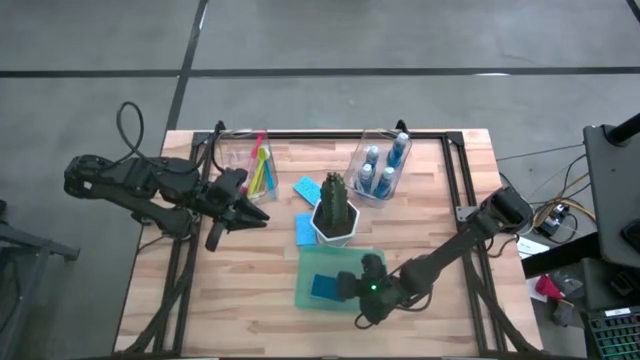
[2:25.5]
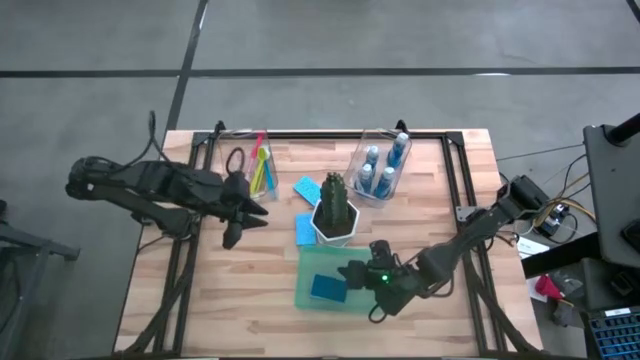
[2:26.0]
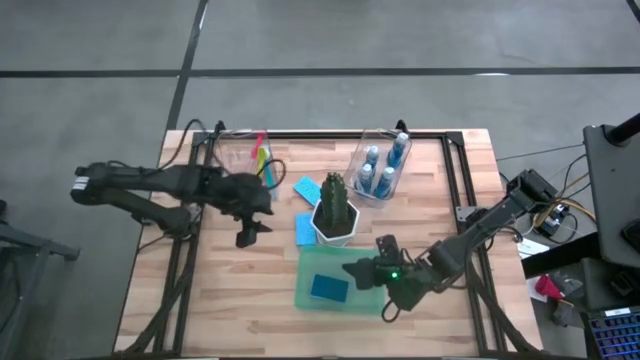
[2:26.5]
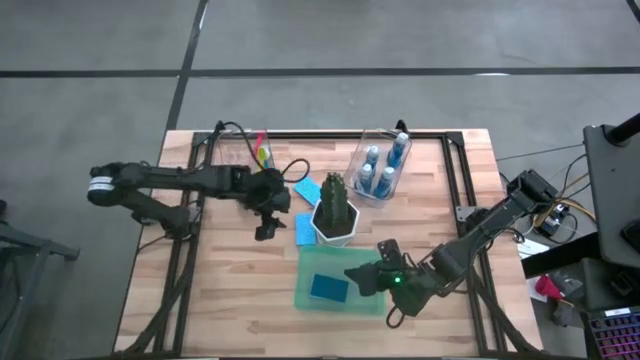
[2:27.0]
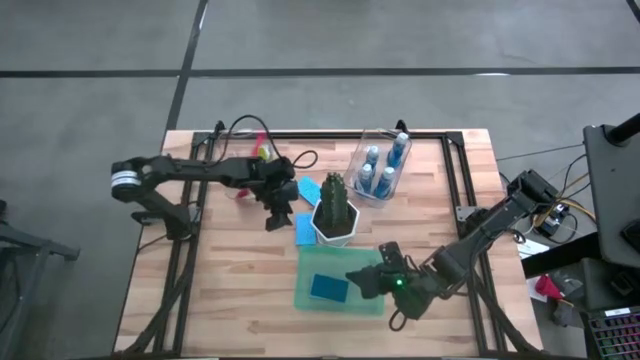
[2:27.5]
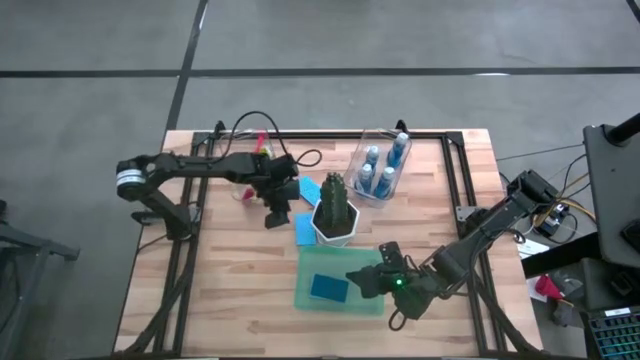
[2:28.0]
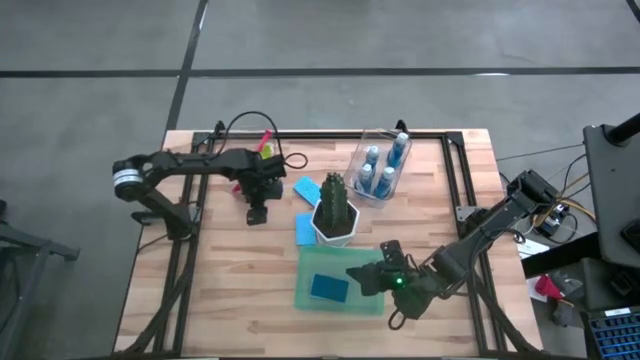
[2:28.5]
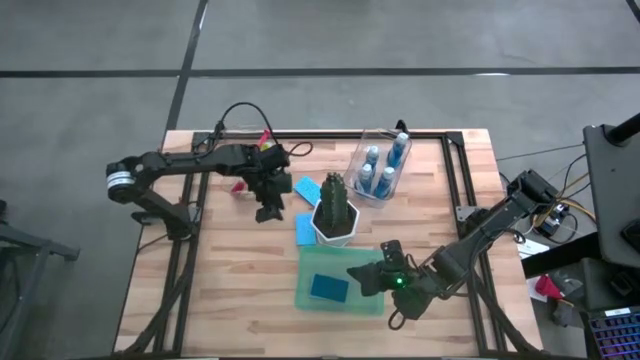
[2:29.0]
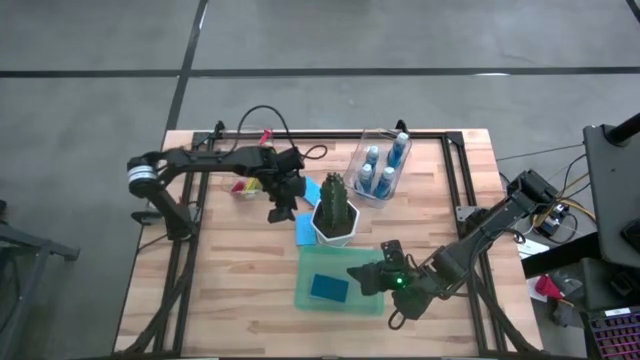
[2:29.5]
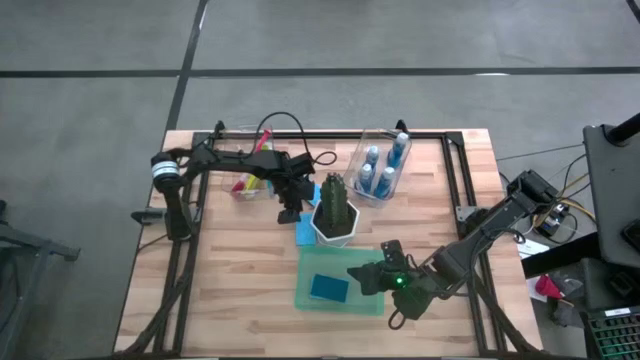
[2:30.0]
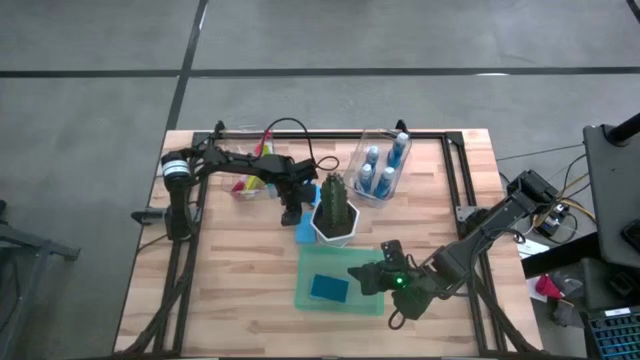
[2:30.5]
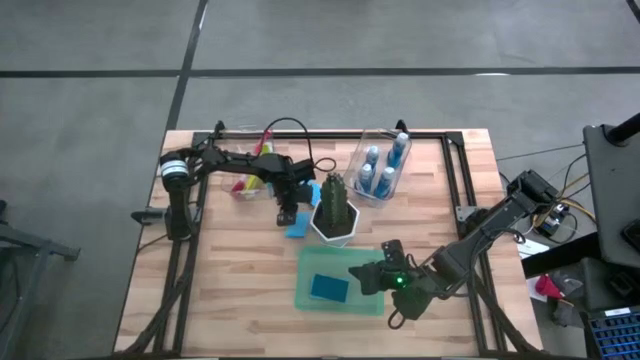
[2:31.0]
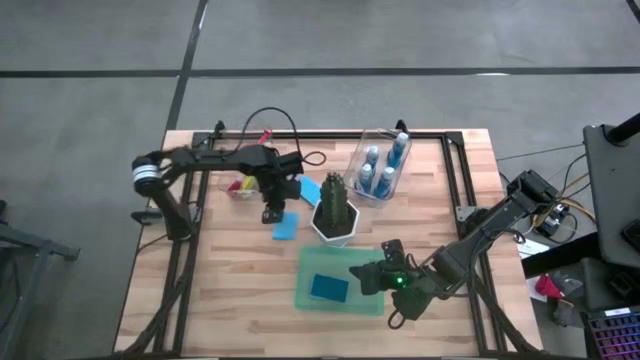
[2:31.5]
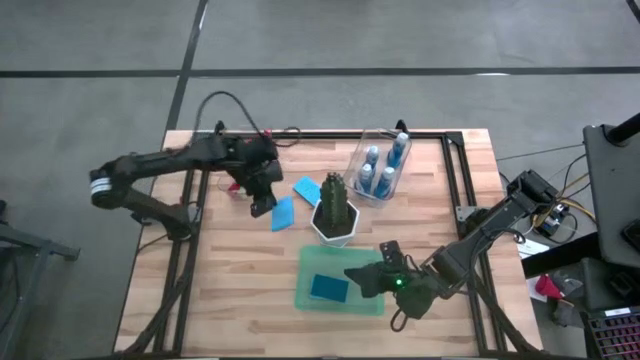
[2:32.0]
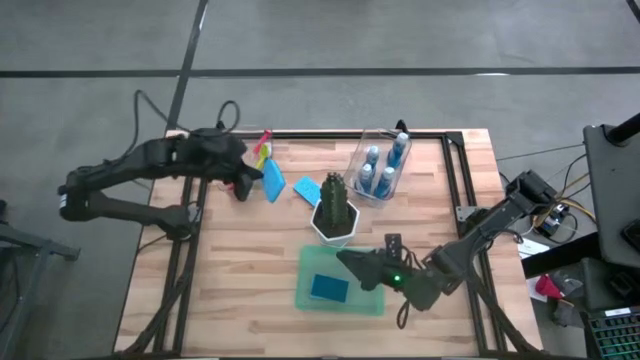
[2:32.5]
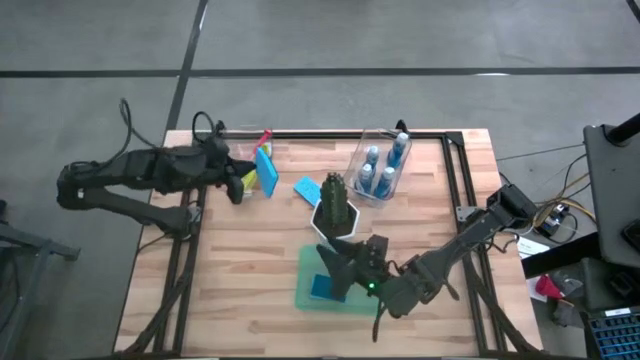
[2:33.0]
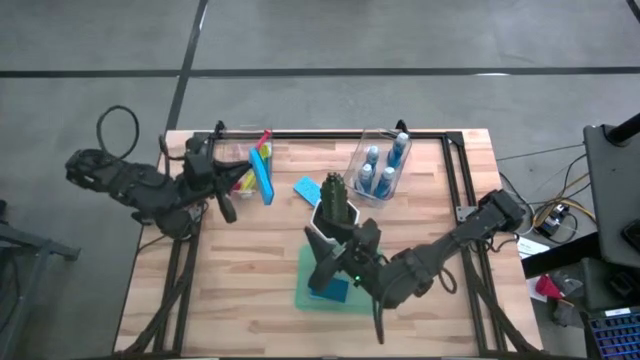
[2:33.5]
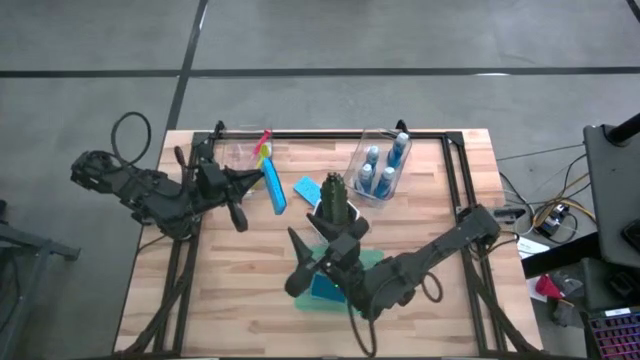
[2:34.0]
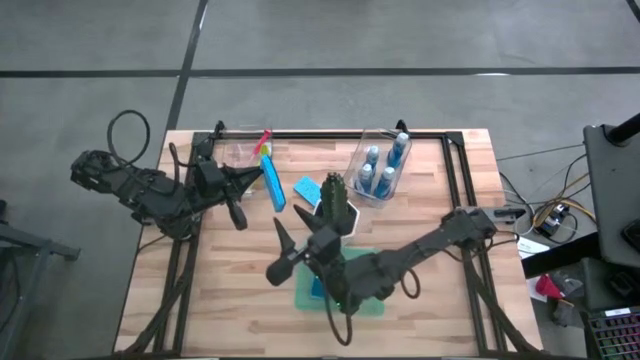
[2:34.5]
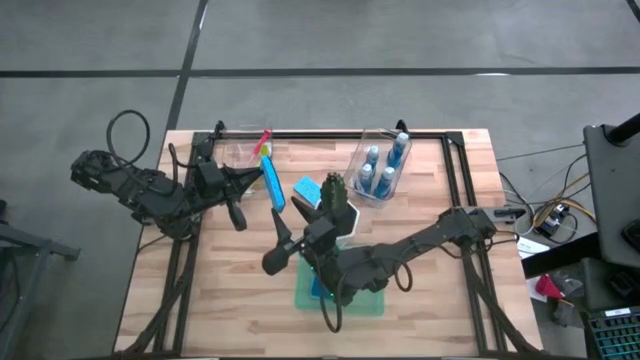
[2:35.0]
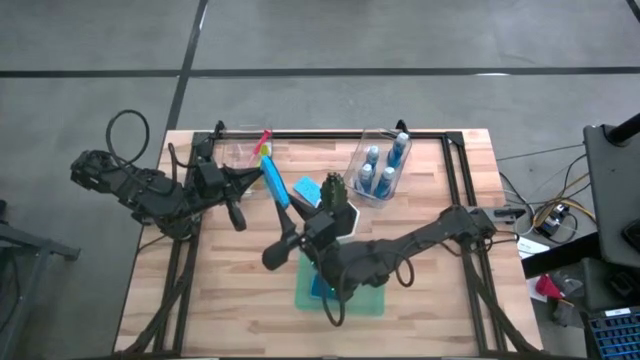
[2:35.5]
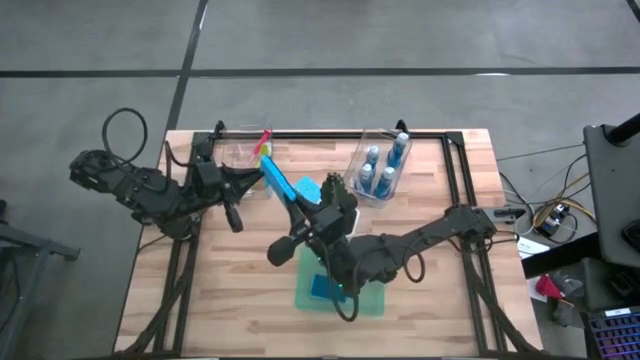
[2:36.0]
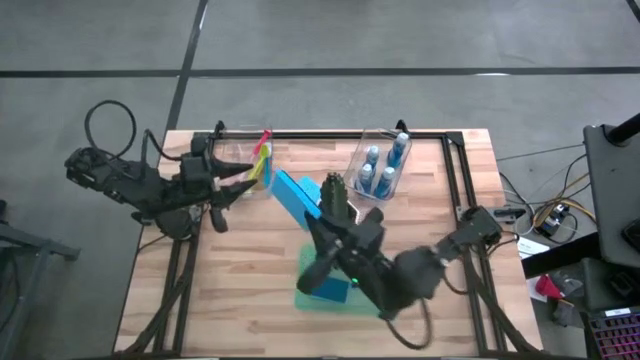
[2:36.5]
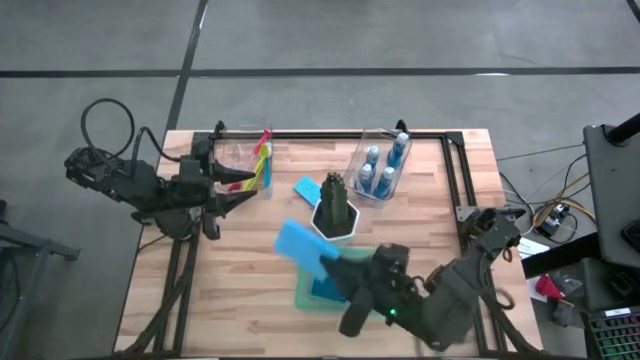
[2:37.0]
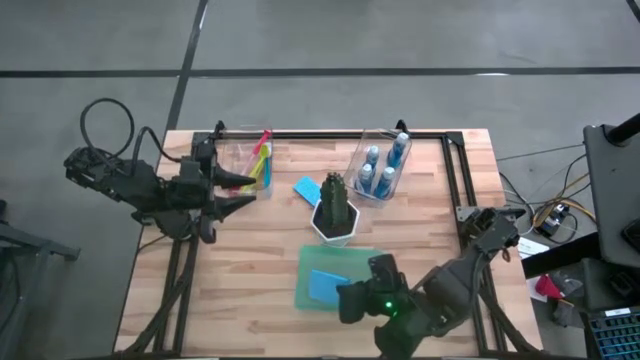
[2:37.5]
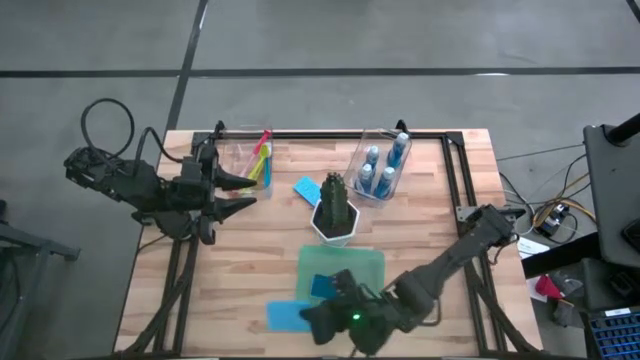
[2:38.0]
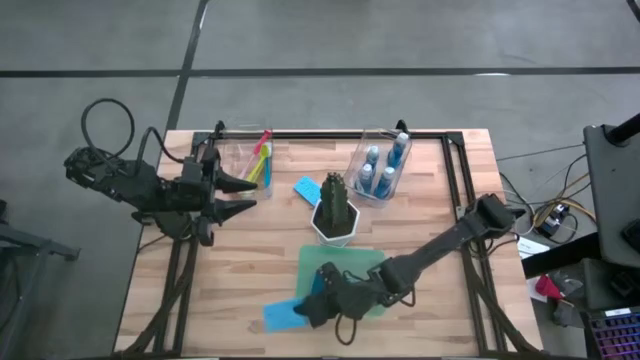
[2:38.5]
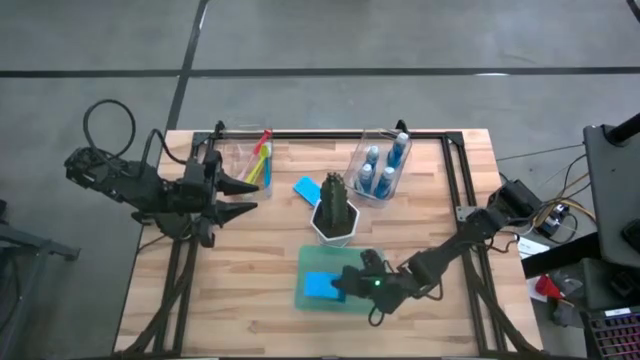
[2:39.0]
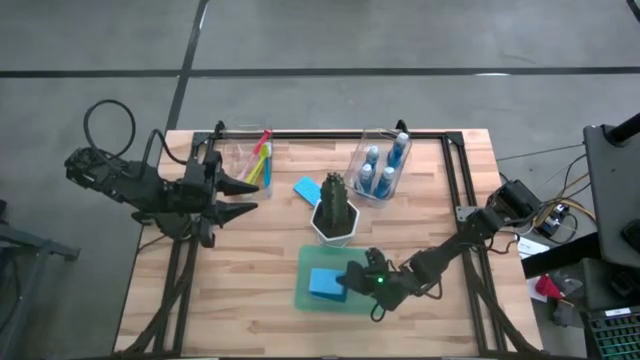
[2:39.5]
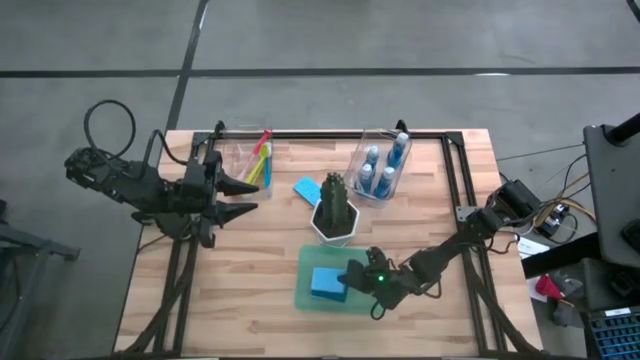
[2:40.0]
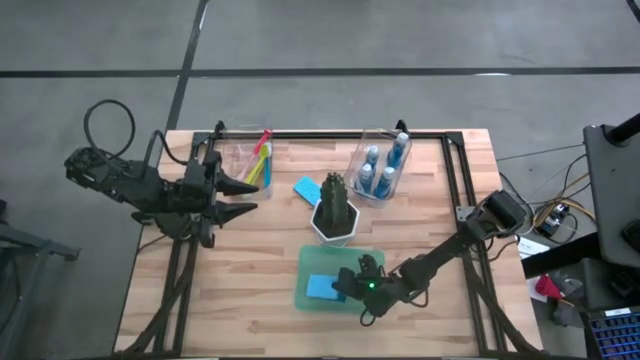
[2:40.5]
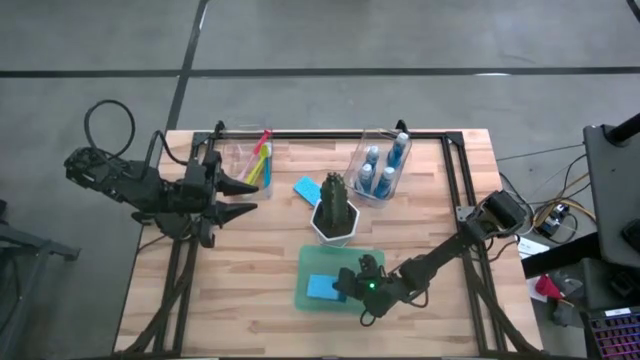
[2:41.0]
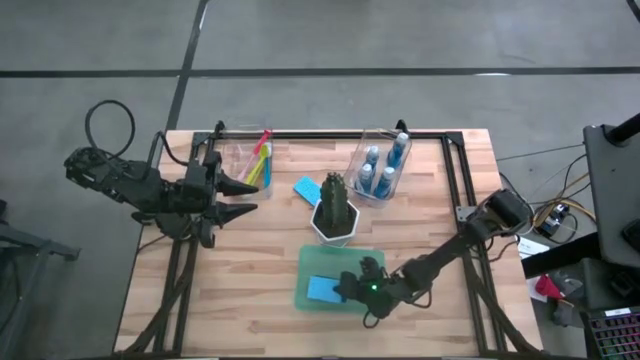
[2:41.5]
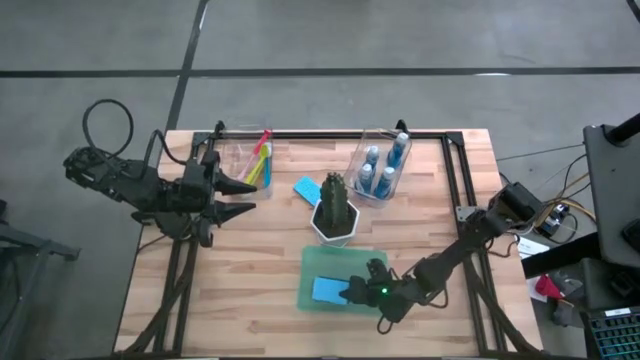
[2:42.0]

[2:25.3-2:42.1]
Task: Pick & Place Kitchen Sink Supplies
Stack the sponge on top of the sponge in the green bin

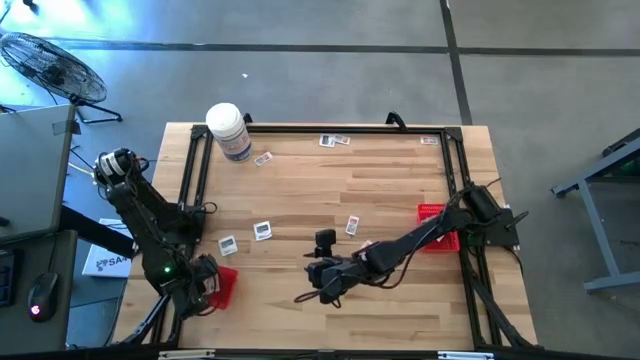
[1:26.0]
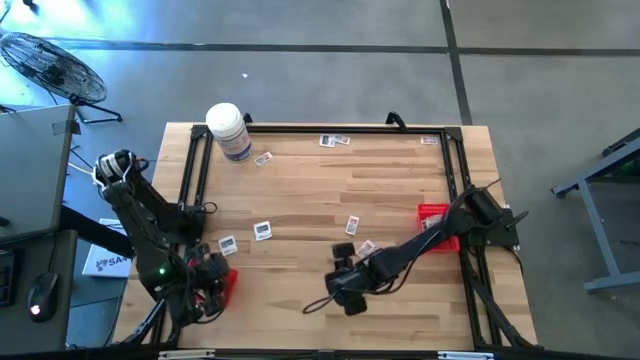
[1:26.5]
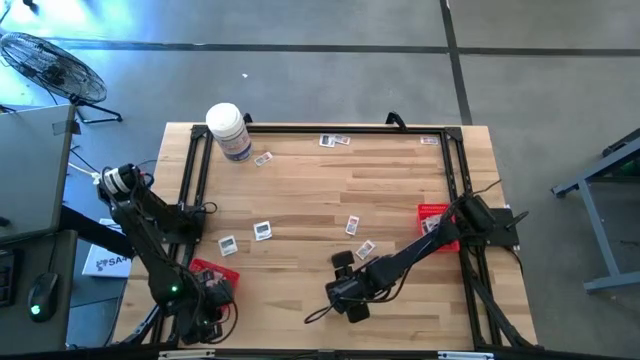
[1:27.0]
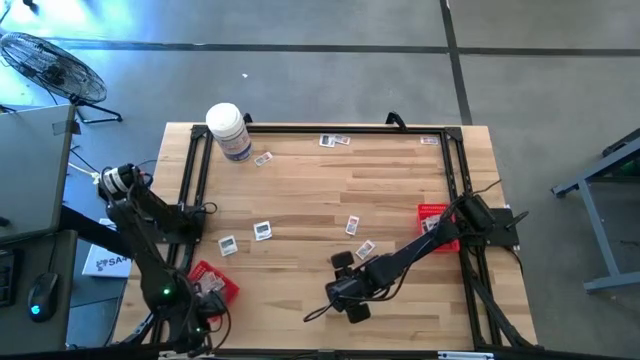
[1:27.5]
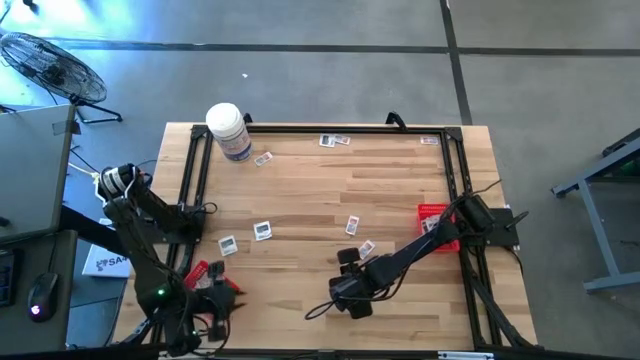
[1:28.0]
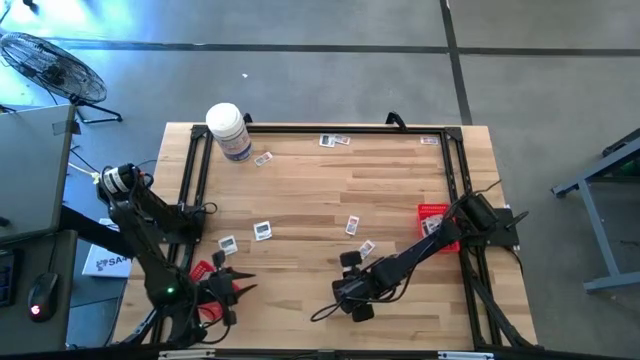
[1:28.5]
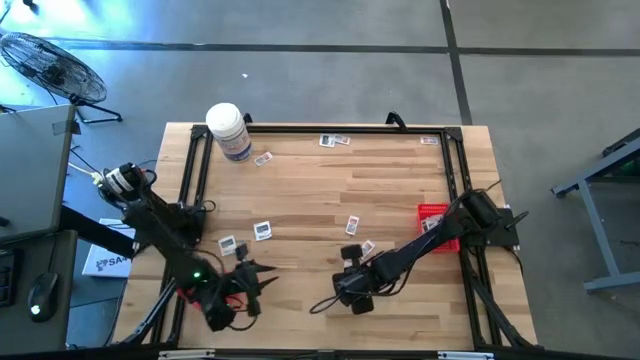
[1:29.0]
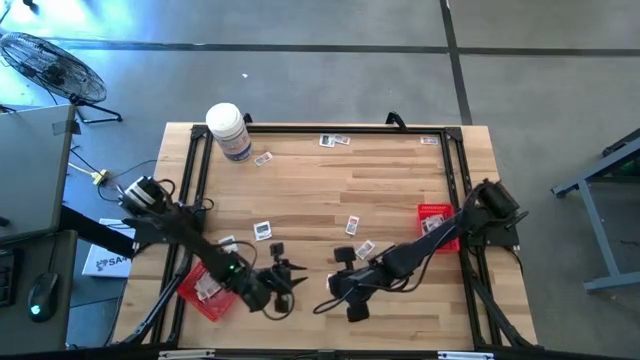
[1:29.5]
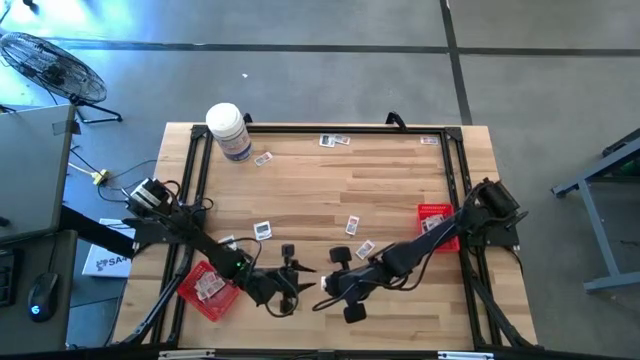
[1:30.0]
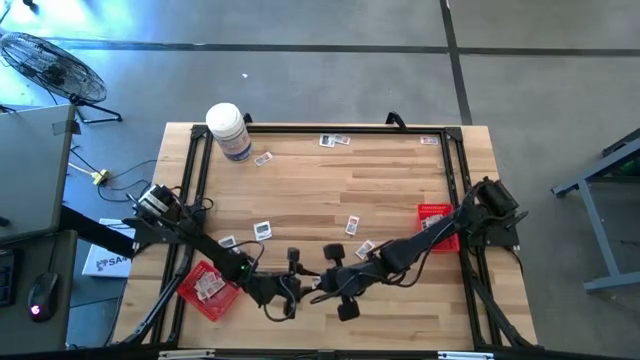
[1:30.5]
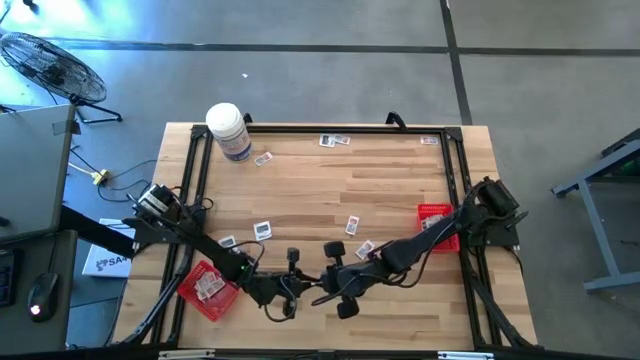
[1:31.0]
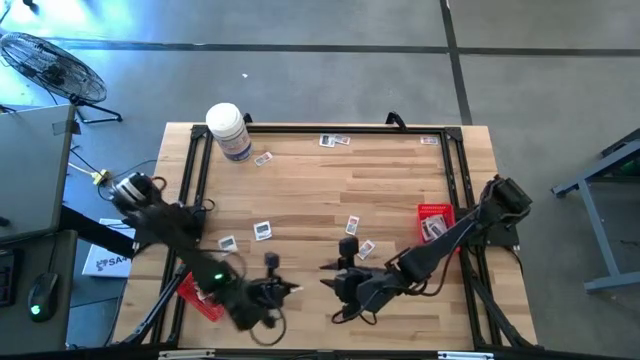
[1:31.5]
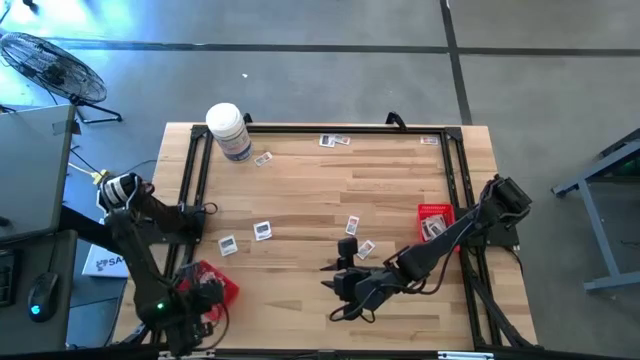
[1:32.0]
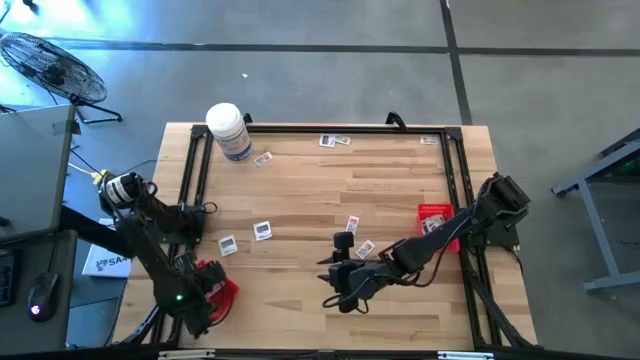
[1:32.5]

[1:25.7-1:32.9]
Task: Pick & Place First Aid Supplies
Put the ointment pack into the left red bin
